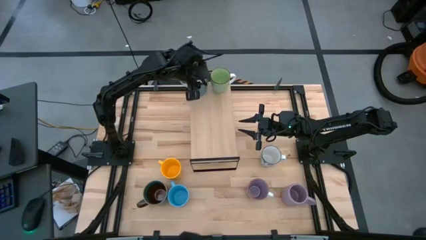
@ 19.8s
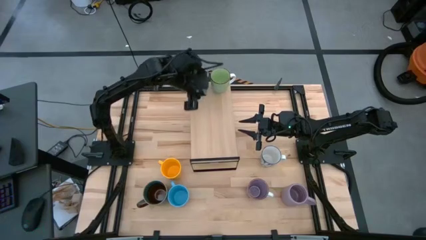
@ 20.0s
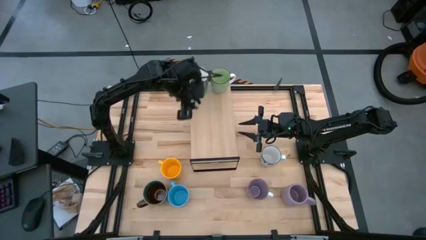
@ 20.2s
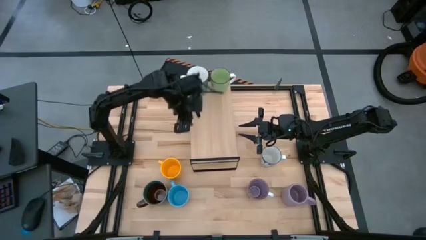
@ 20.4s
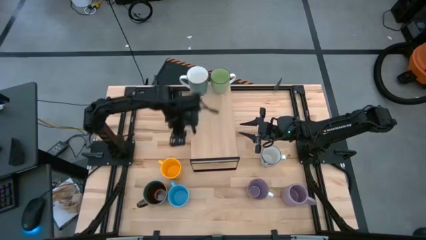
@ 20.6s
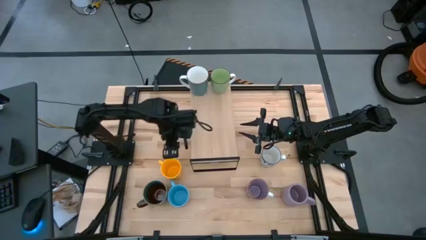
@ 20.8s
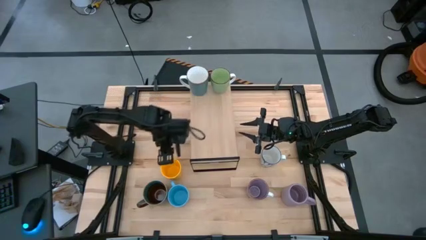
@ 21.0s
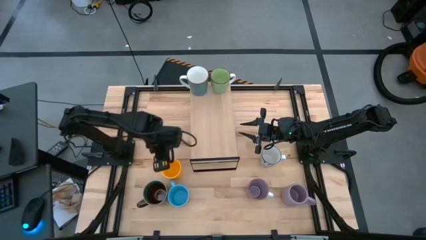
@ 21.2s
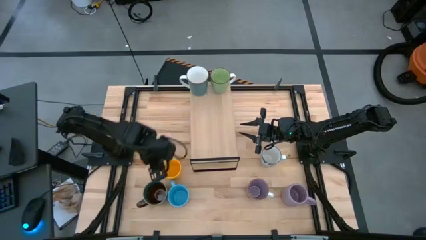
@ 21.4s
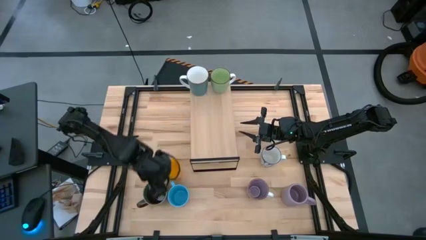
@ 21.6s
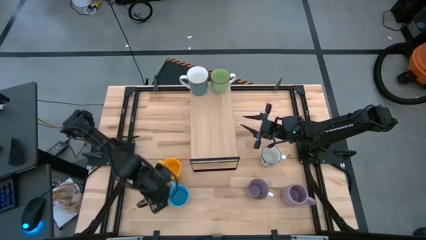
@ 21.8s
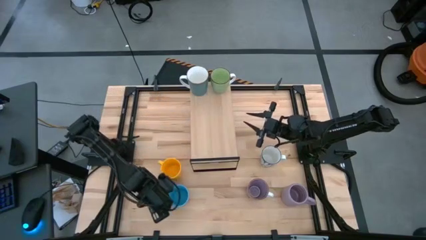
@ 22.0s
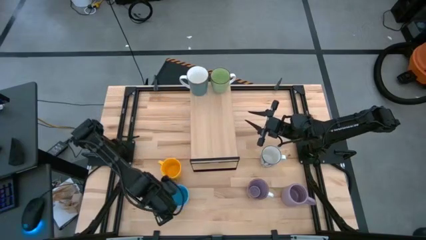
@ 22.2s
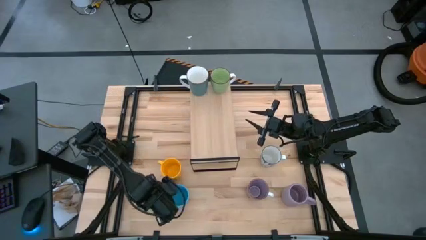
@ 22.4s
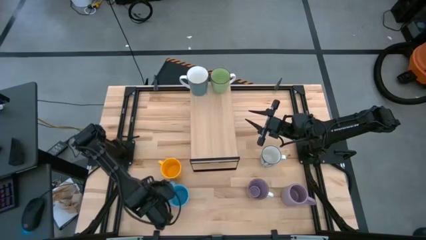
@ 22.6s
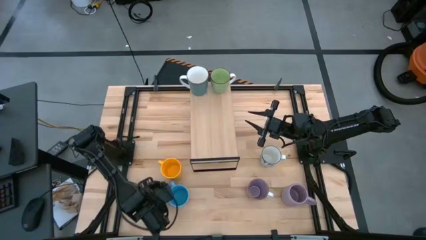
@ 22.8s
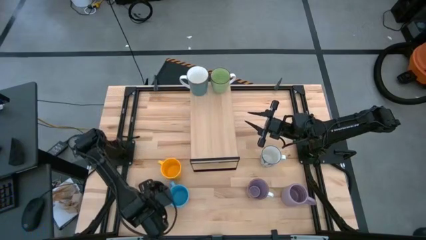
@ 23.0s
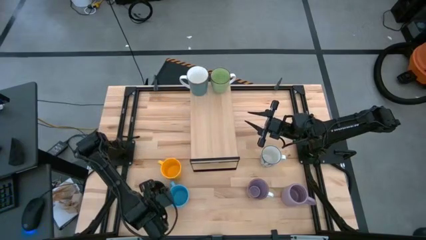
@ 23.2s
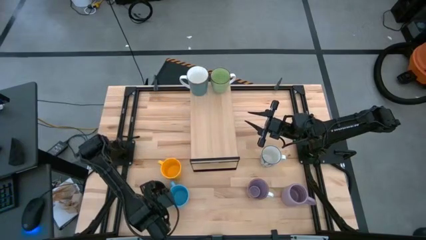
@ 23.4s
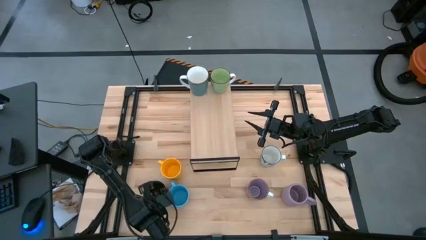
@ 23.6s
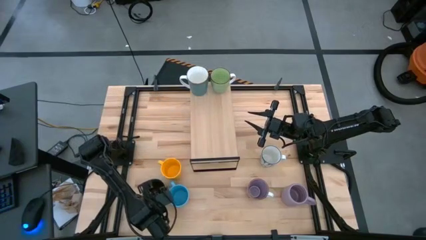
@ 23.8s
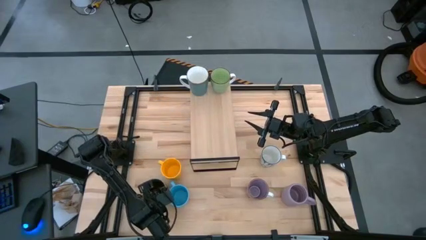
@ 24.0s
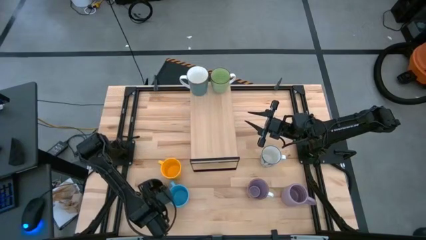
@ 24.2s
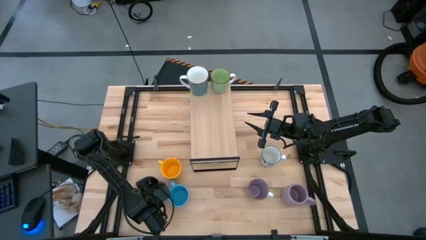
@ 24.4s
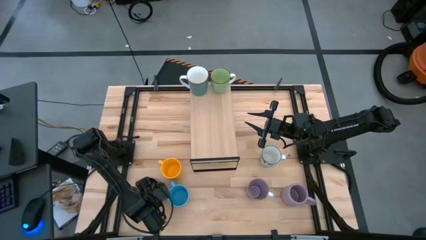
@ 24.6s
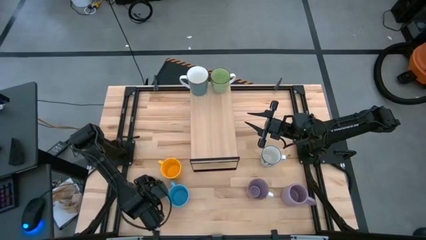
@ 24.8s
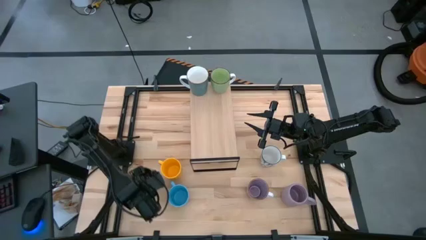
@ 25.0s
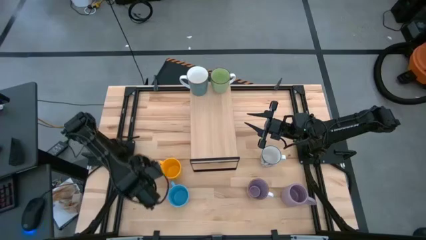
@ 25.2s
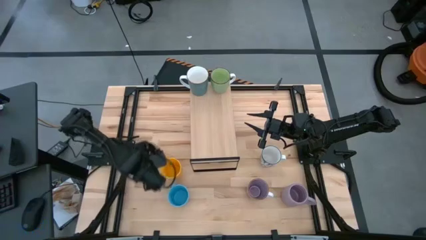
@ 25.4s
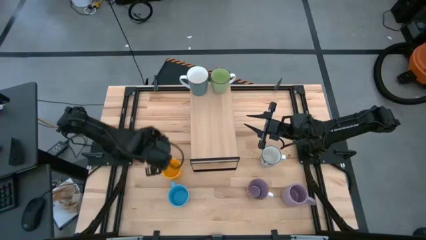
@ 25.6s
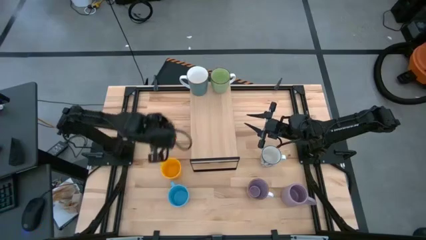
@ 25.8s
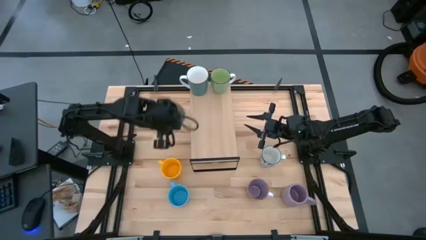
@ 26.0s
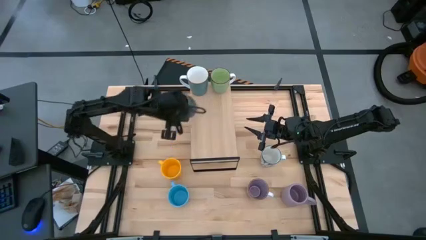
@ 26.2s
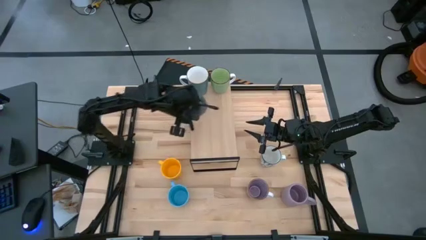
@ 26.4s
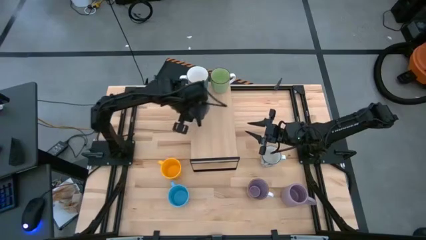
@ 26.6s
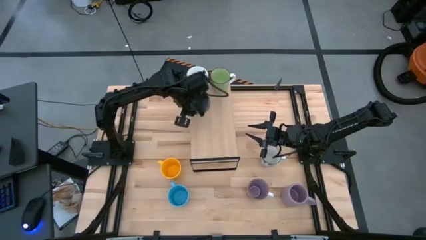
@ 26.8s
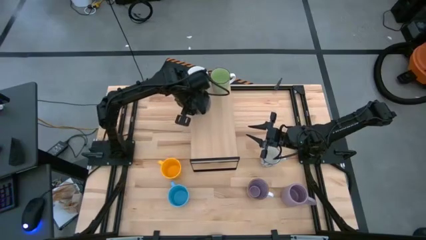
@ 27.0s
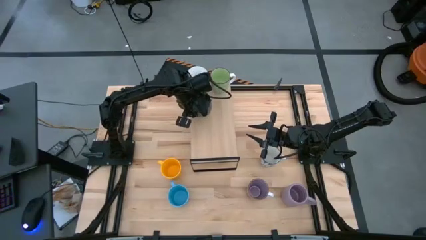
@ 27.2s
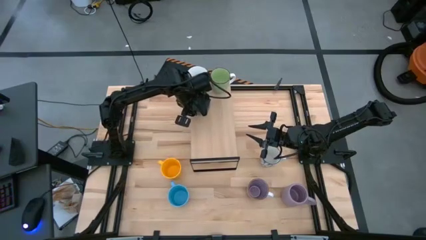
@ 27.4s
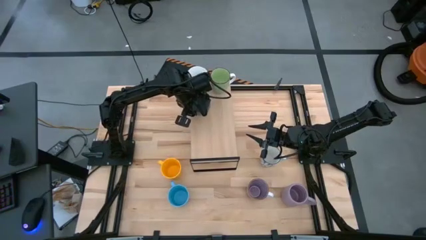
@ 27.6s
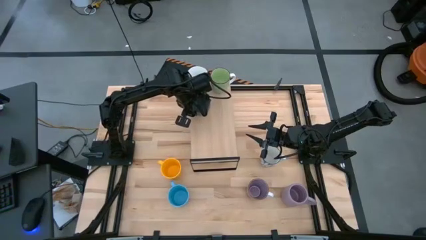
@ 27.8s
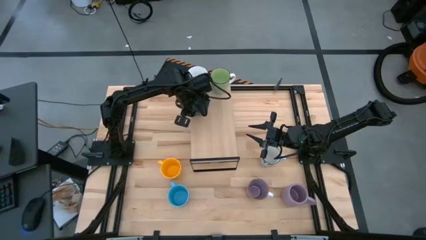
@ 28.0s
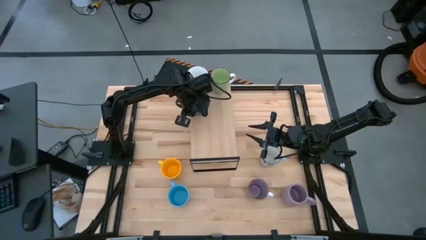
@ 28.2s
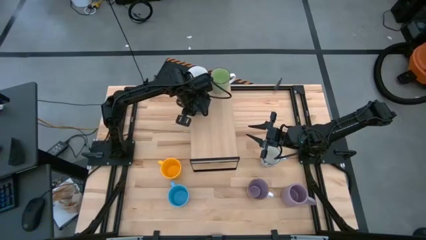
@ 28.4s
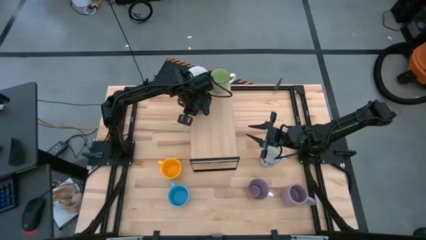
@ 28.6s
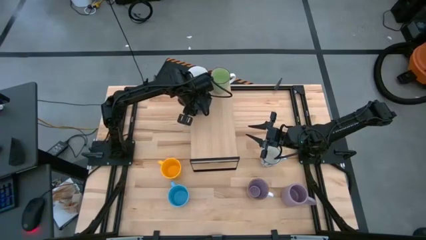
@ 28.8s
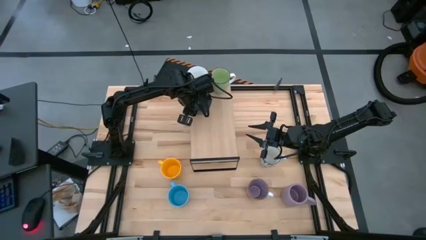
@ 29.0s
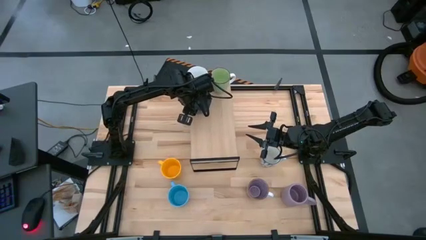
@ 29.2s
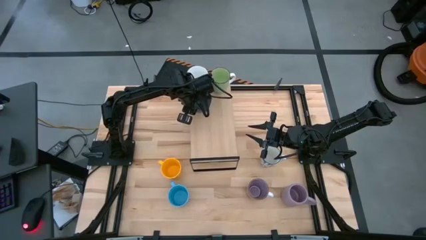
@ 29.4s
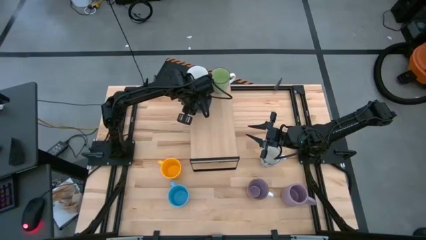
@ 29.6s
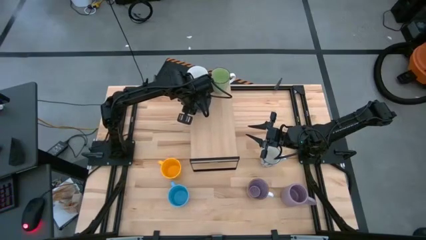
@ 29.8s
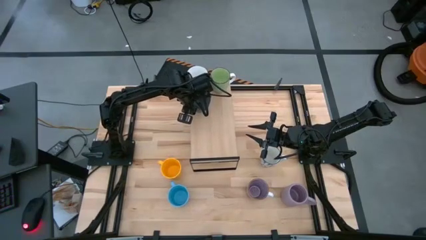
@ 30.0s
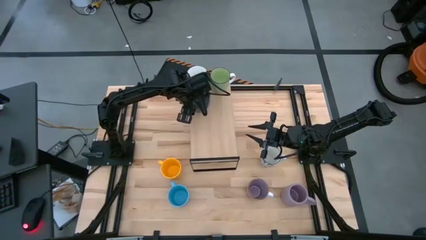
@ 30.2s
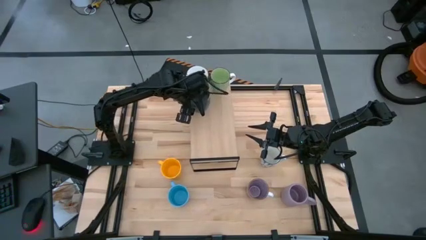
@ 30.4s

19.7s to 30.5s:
Task: Place coffee mugs
Put the dark blue mug on the shelf

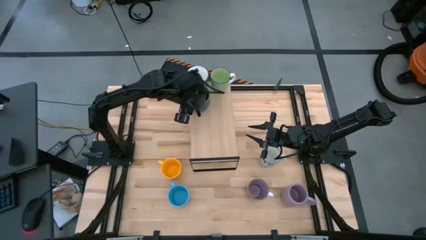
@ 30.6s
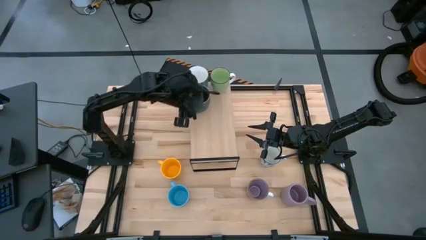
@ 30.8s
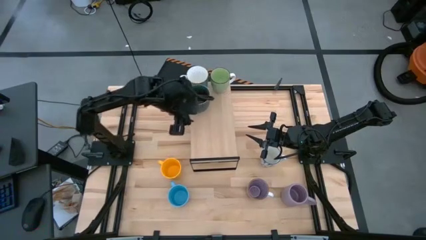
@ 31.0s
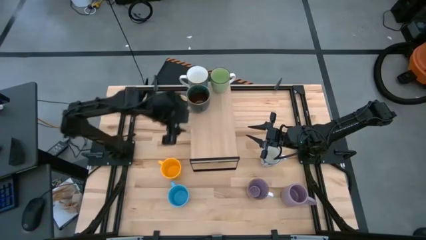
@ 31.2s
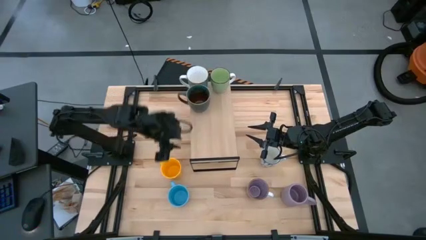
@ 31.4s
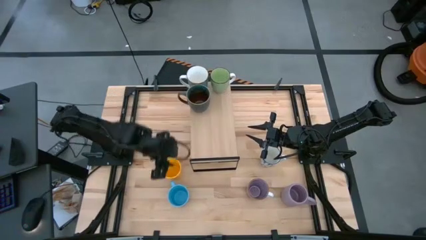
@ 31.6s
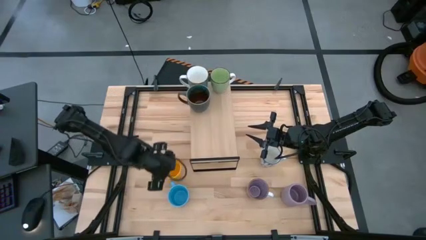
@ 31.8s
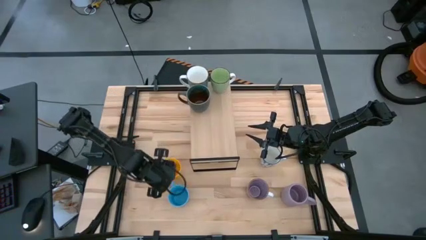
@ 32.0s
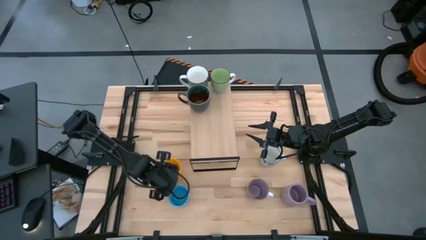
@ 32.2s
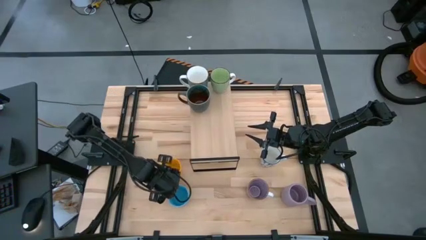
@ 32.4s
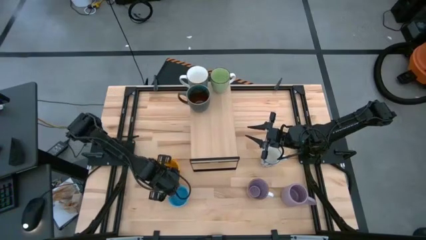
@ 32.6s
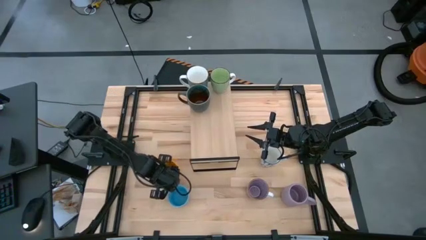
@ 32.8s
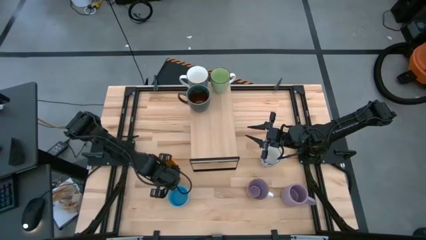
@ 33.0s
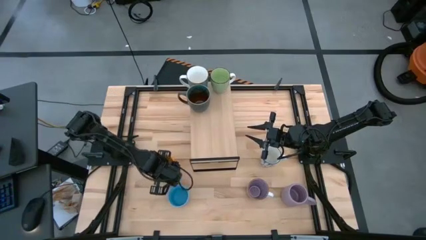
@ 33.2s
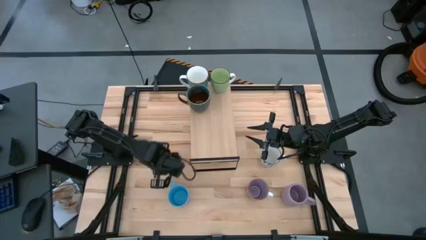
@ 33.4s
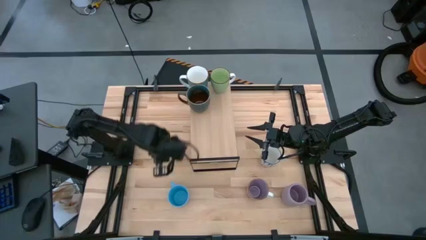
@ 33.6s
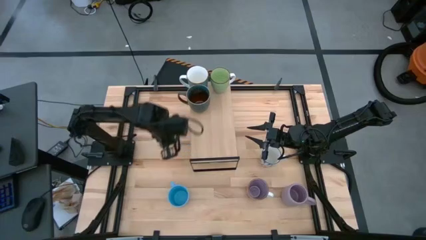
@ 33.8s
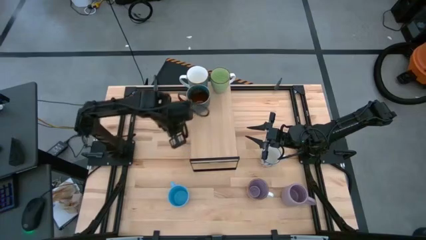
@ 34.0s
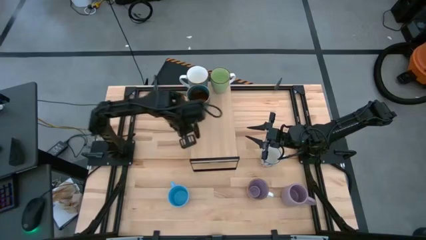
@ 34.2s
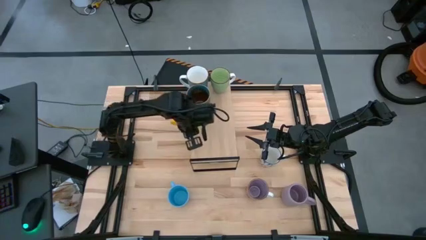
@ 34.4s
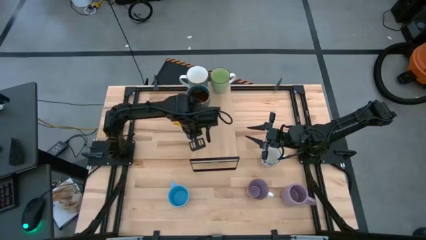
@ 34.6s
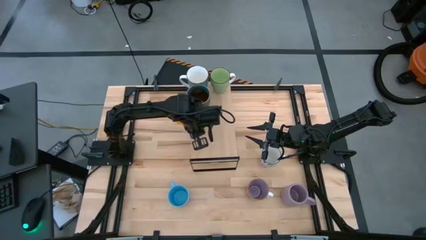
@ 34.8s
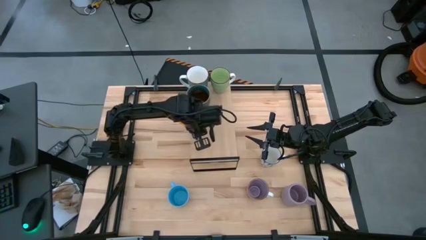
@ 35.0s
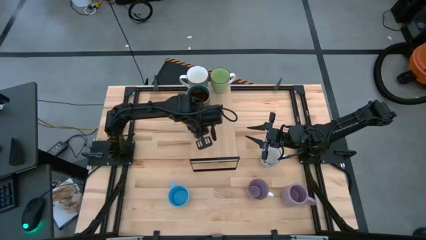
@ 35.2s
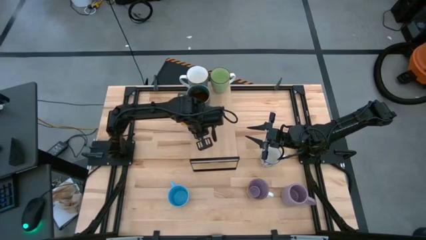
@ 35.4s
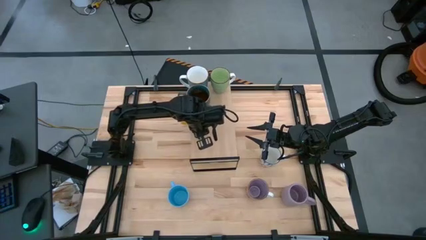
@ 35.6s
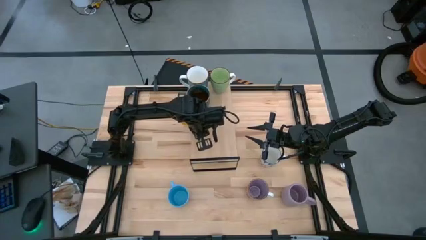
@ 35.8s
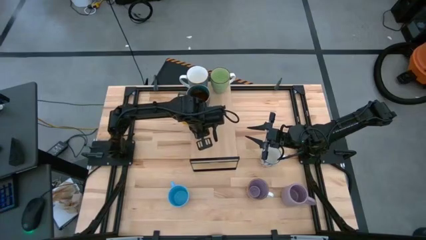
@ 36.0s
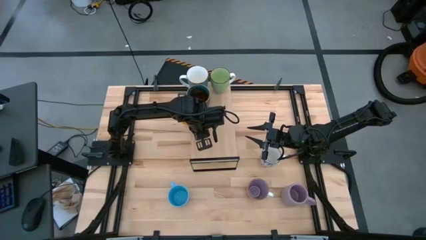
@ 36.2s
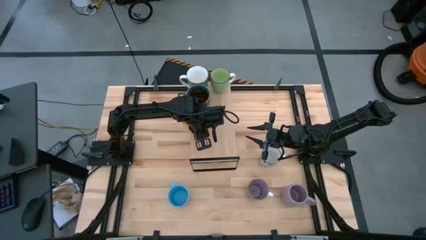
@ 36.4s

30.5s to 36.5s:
Put the yellow mug on the shelf
